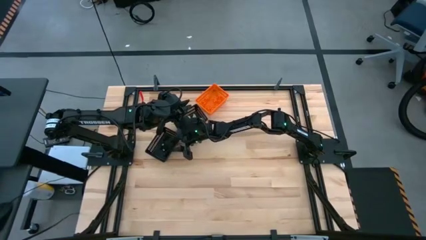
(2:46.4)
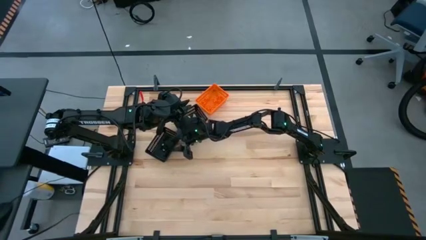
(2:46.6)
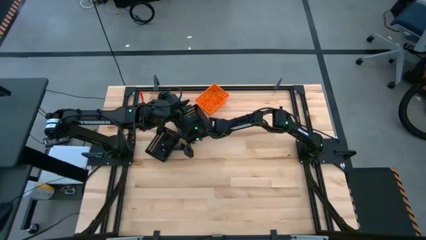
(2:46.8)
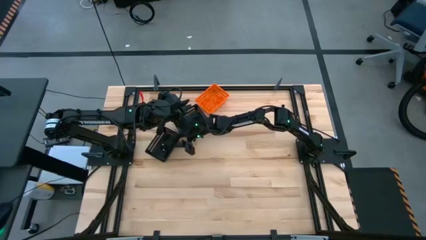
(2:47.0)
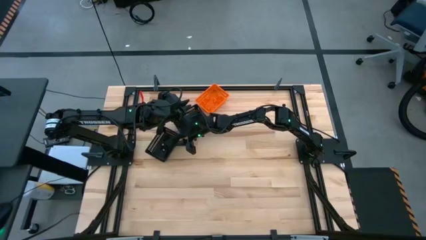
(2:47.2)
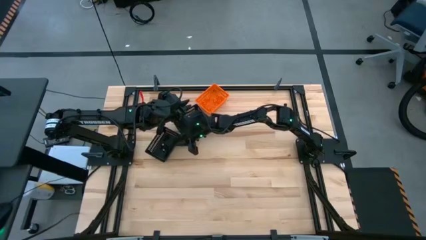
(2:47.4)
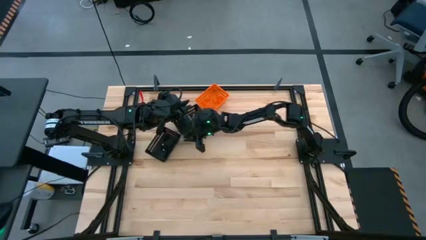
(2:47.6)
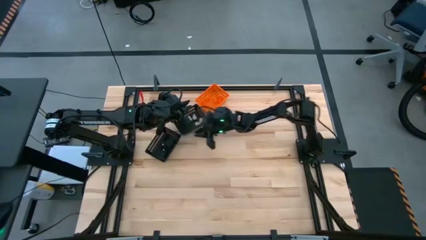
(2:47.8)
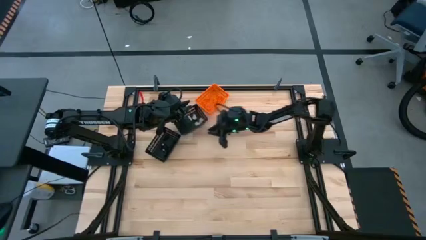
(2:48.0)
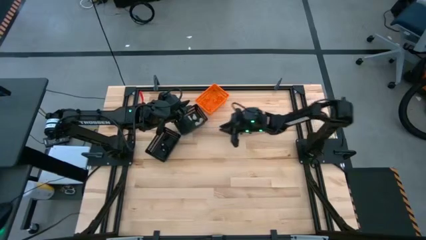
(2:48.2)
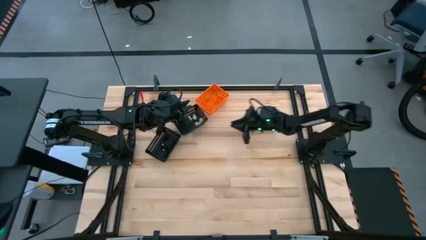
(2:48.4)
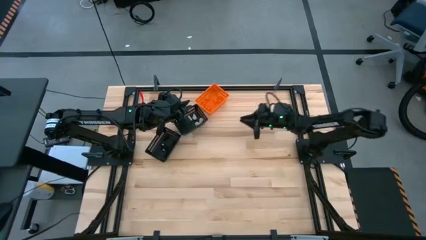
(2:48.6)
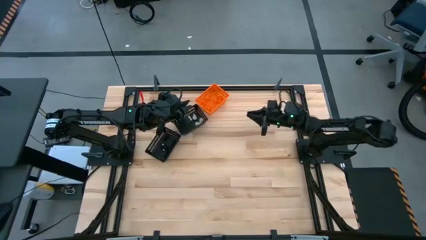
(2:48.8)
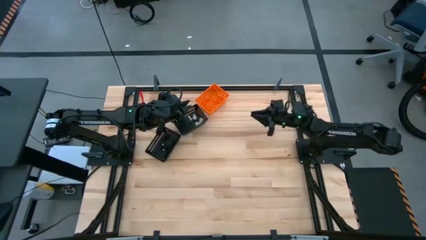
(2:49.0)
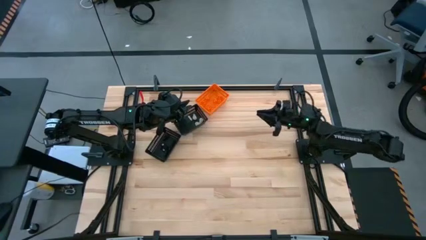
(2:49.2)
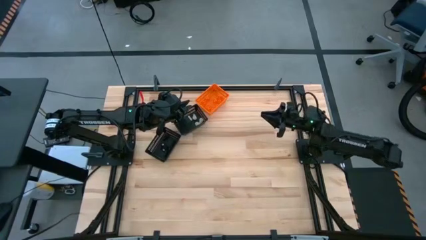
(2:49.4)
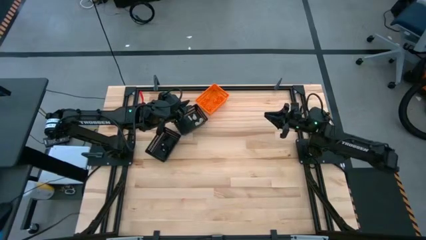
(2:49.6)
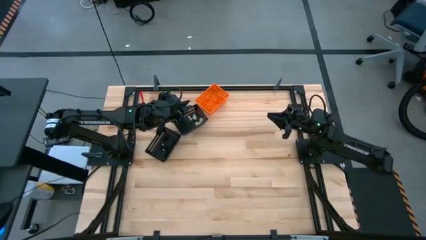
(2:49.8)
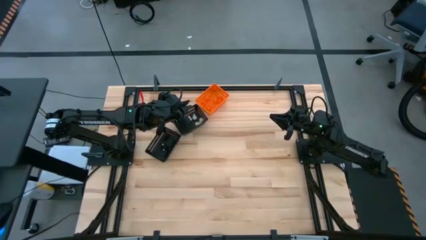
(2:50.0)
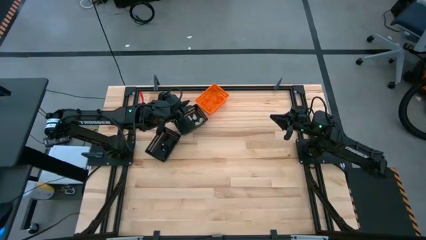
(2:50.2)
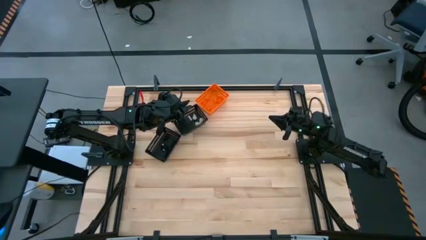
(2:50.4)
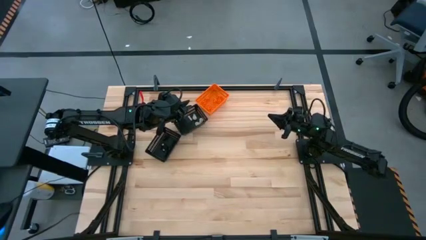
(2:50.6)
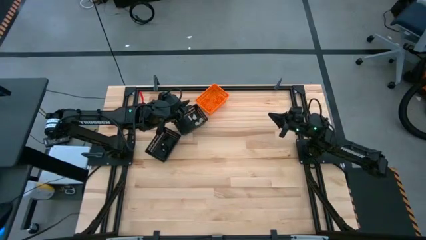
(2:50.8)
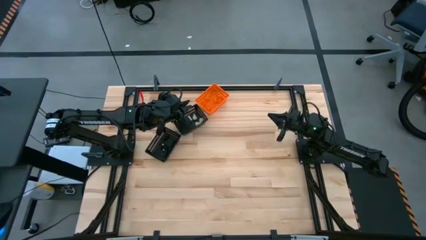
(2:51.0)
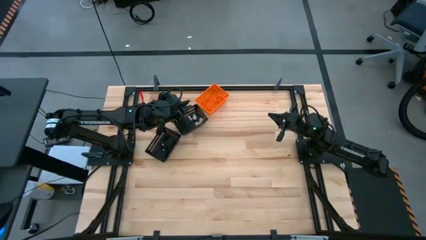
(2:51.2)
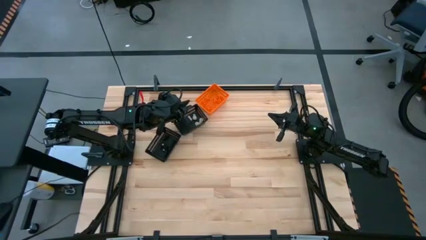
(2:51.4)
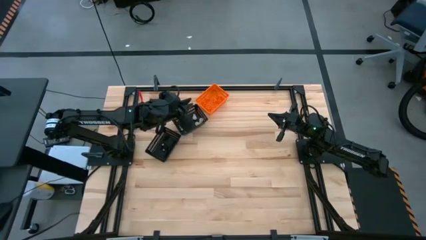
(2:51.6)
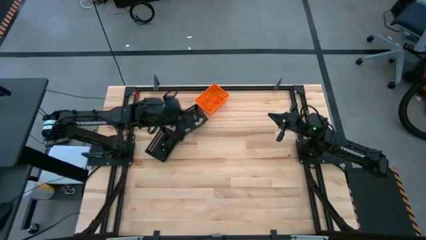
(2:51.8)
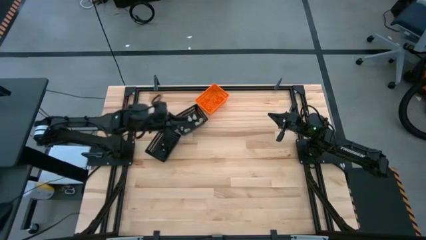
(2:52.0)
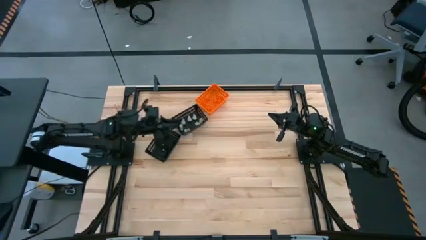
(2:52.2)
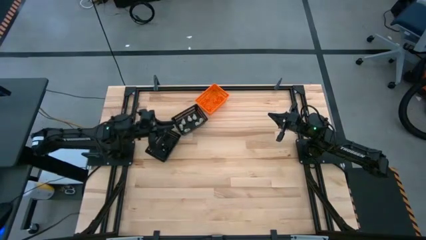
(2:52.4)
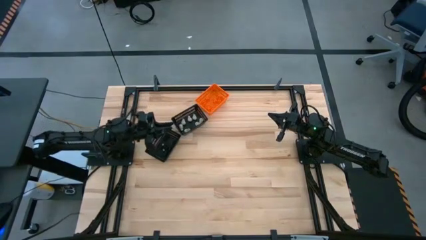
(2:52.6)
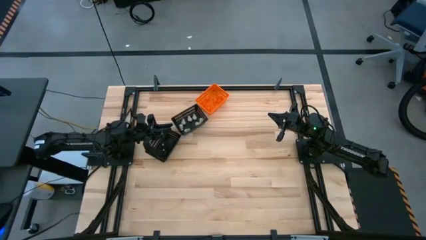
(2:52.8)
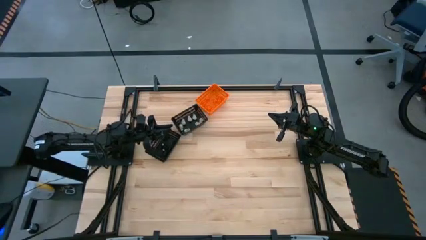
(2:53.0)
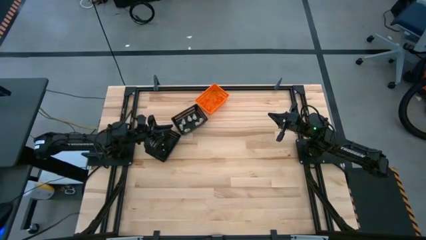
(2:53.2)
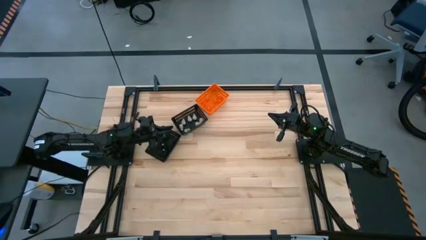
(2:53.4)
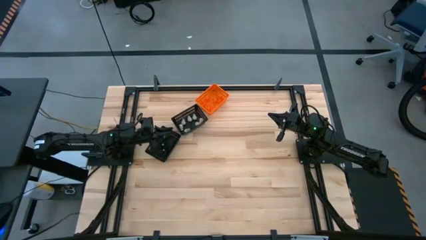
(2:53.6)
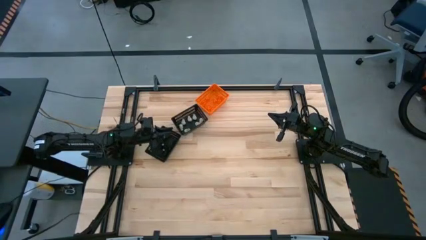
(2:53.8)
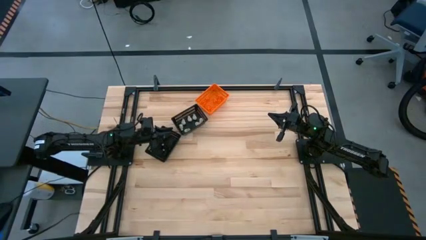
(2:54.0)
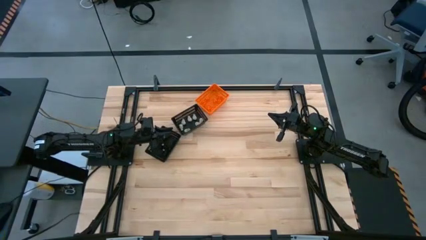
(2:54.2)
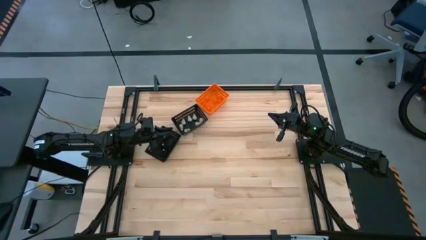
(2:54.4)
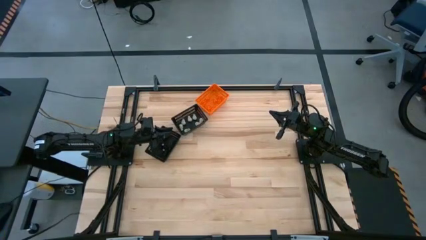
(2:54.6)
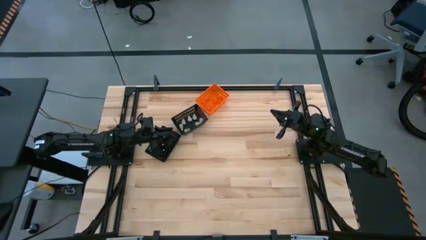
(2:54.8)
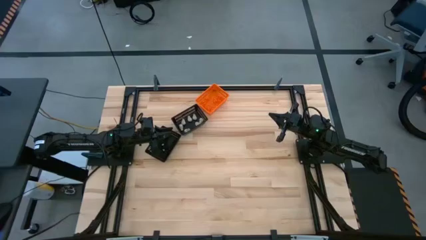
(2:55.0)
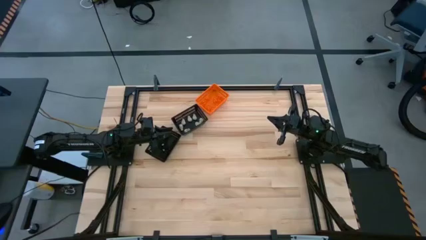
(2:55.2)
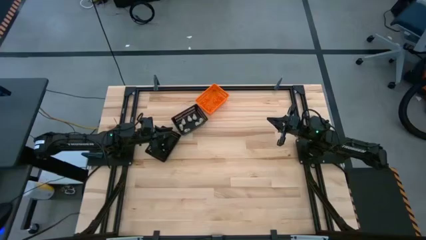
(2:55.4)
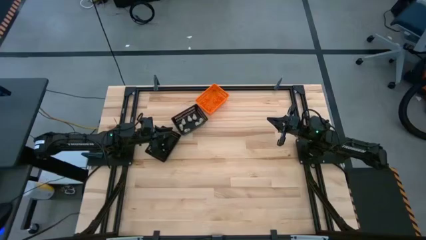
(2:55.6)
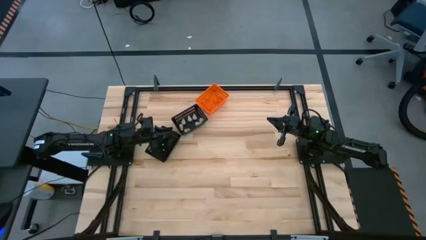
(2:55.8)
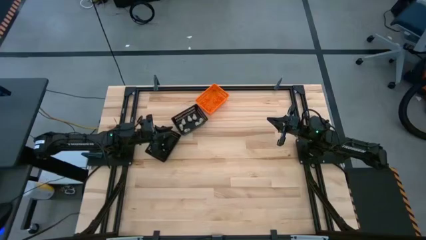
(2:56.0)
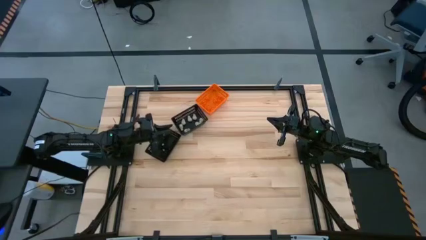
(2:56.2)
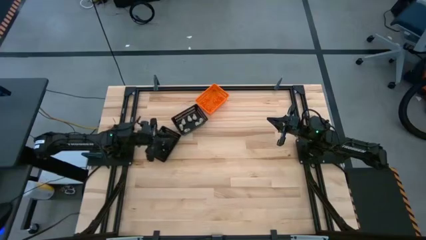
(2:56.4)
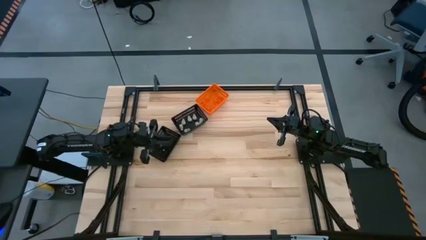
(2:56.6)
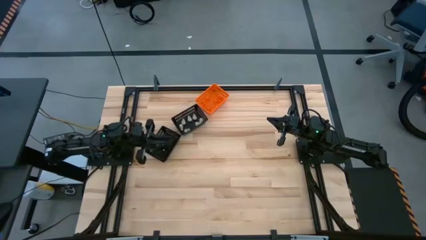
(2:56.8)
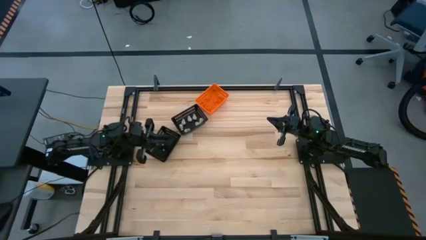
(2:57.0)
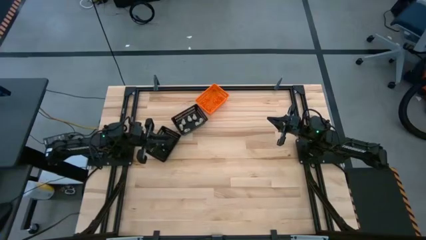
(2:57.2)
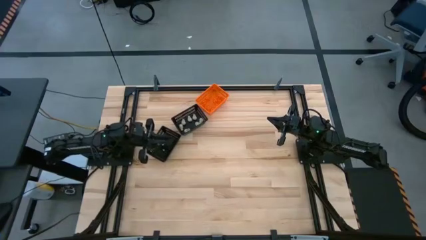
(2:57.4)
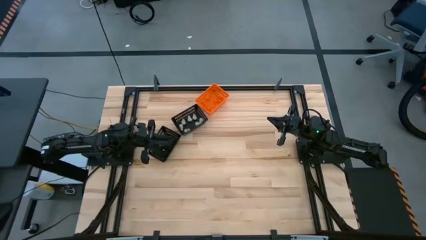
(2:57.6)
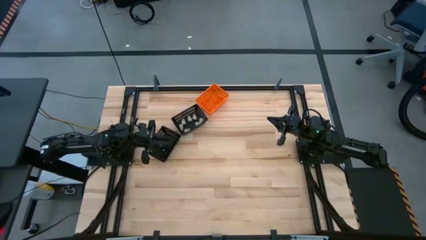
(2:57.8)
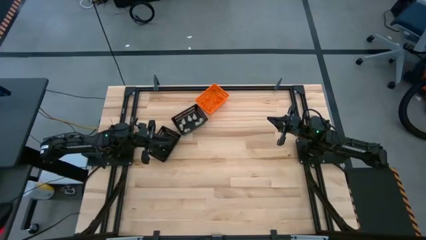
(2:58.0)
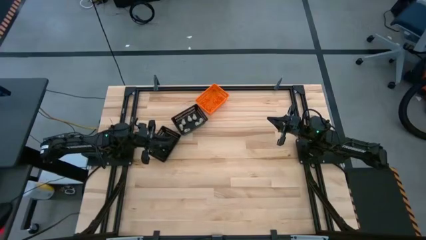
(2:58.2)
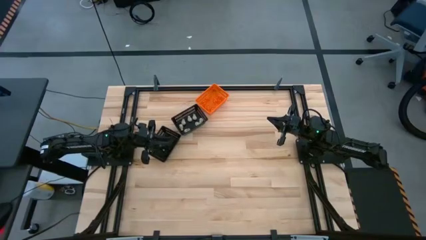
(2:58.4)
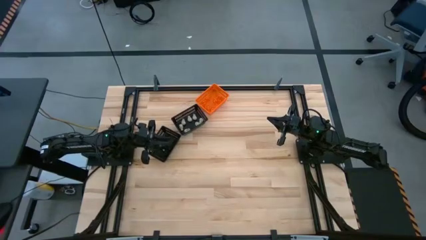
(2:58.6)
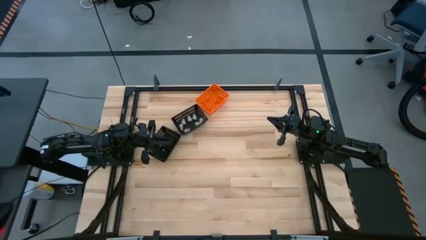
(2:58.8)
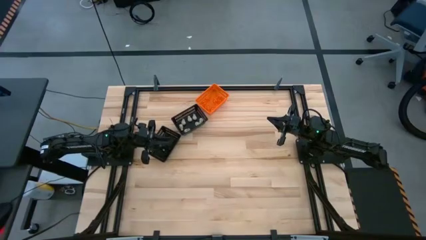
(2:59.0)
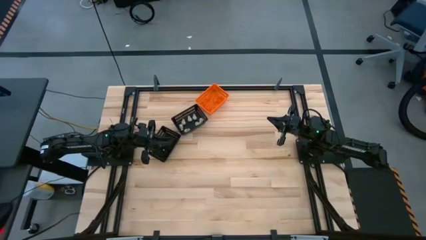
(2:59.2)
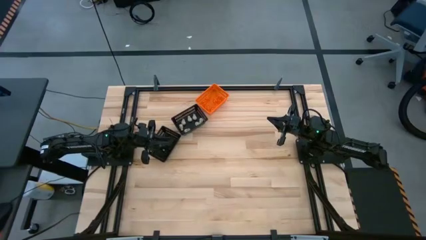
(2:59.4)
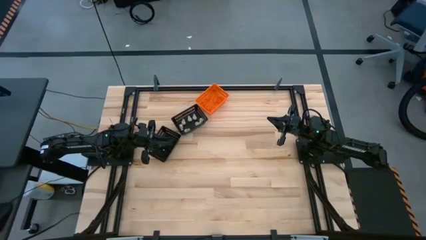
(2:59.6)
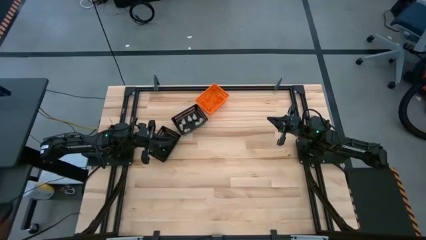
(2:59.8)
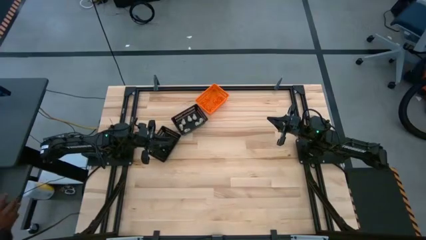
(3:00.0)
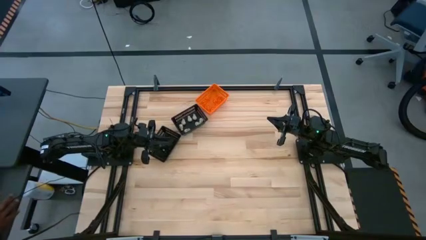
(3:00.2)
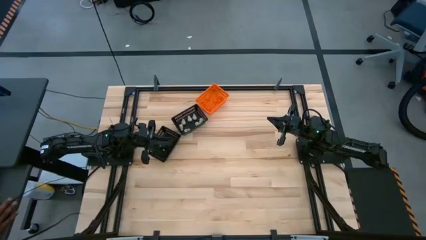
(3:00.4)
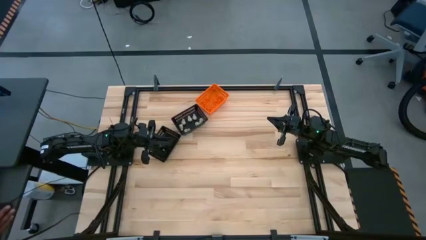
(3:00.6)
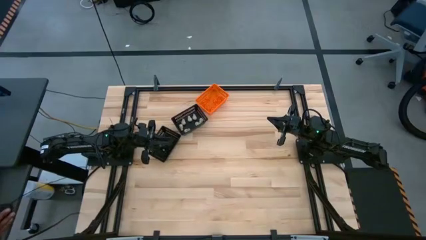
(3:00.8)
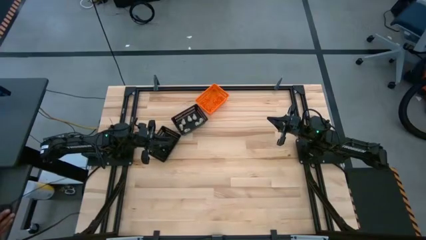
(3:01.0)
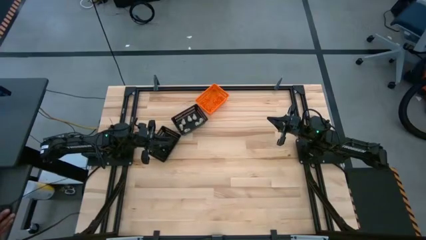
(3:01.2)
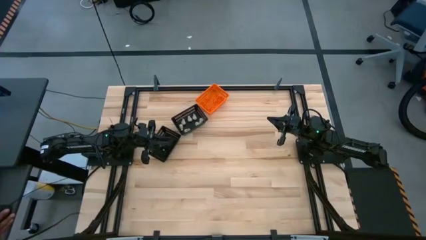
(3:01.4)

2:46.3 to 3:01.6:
Task: Sort Halloween decoration
Return to Home Position
